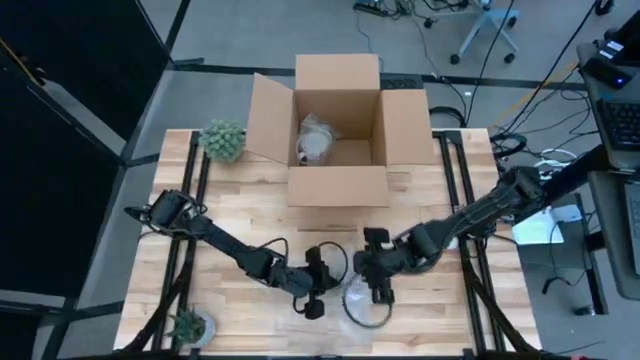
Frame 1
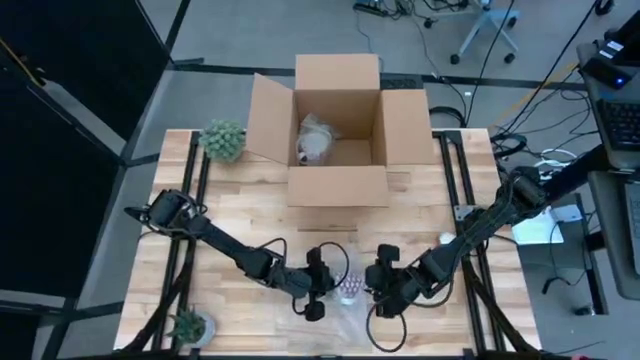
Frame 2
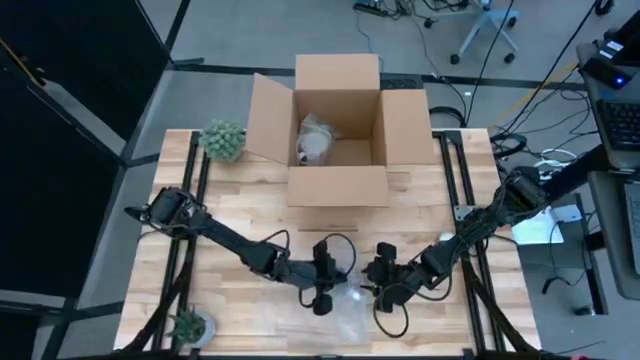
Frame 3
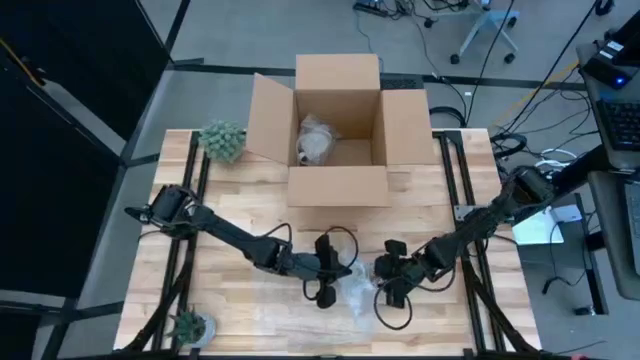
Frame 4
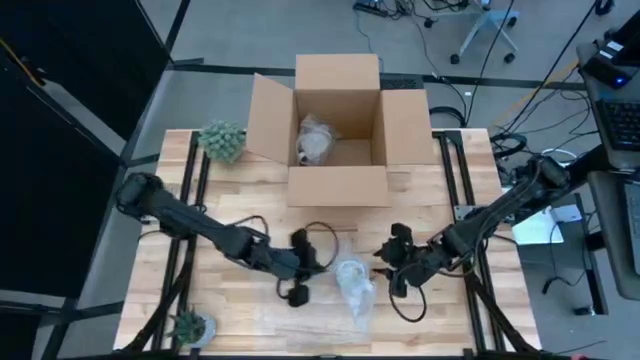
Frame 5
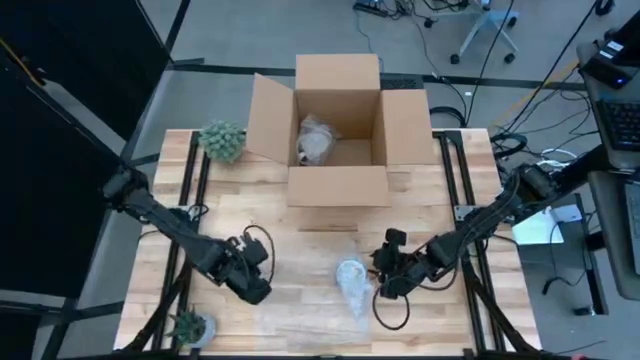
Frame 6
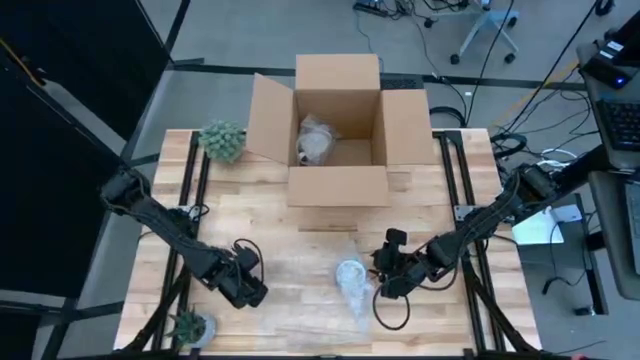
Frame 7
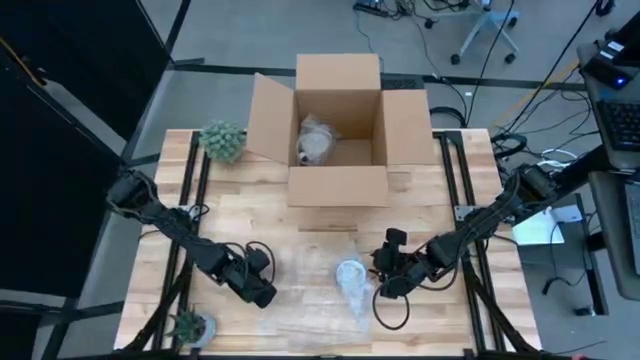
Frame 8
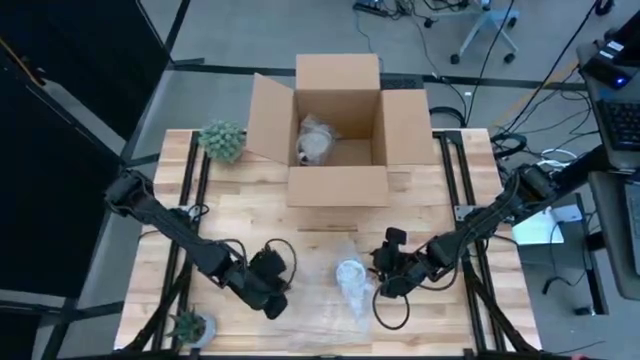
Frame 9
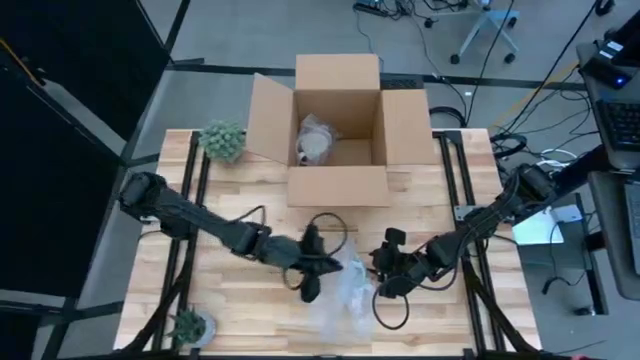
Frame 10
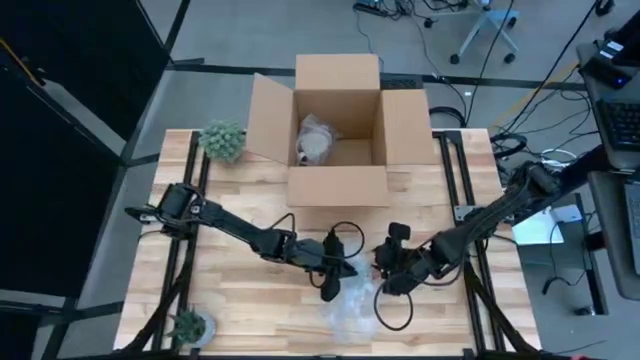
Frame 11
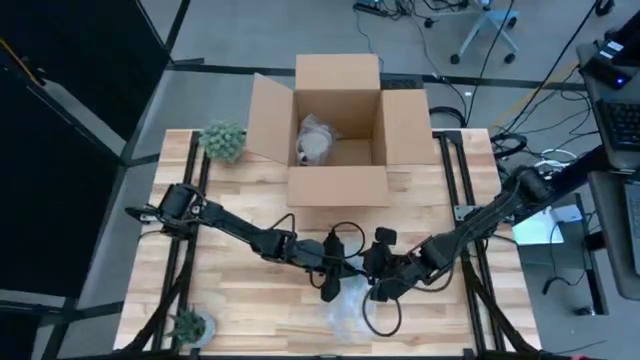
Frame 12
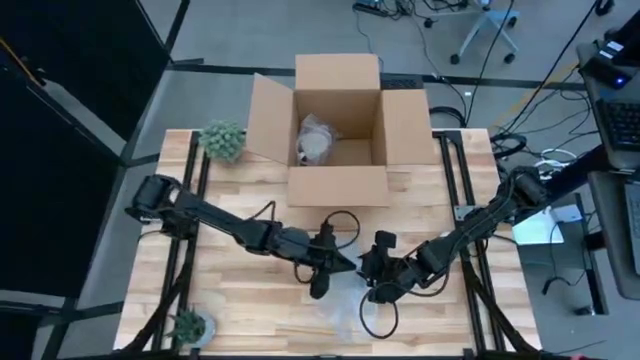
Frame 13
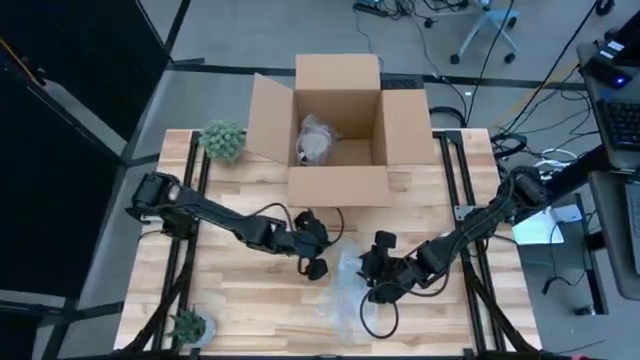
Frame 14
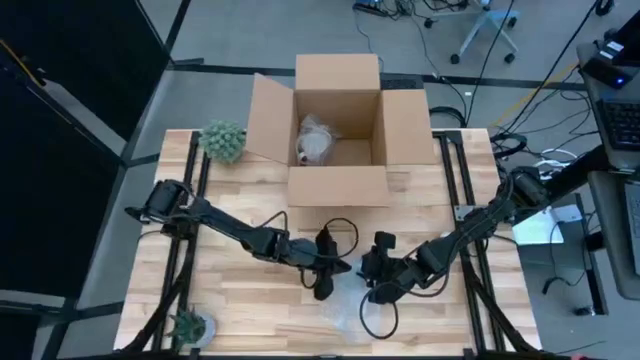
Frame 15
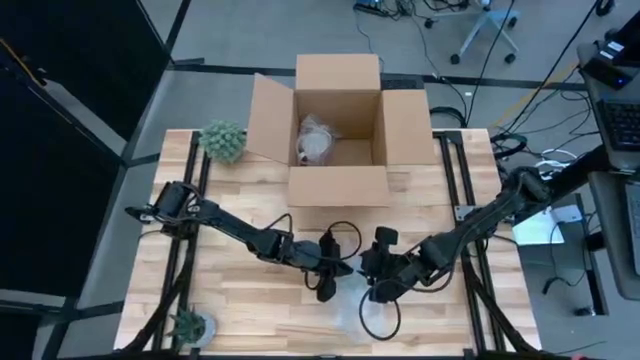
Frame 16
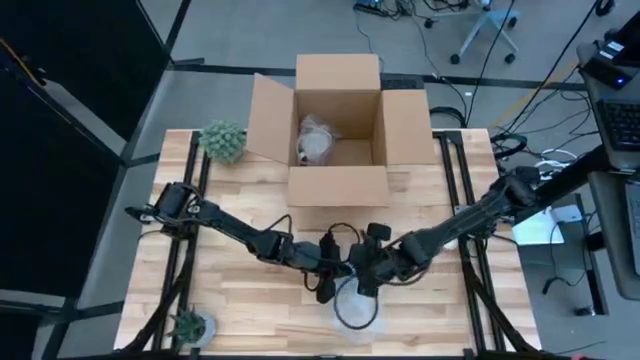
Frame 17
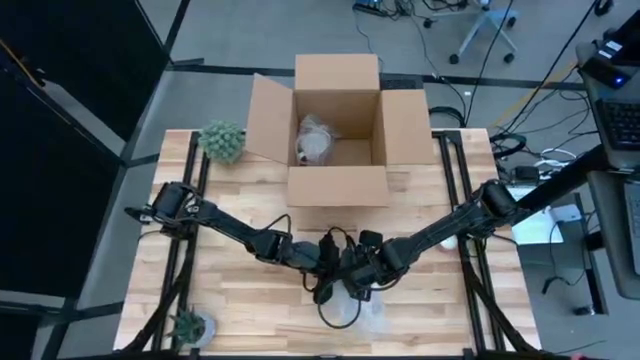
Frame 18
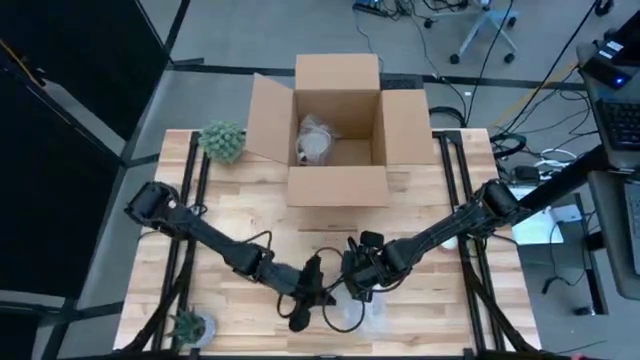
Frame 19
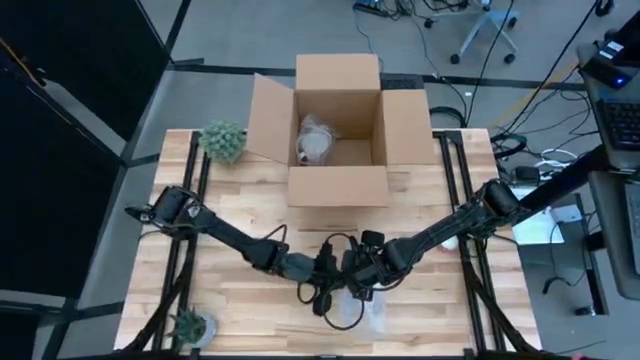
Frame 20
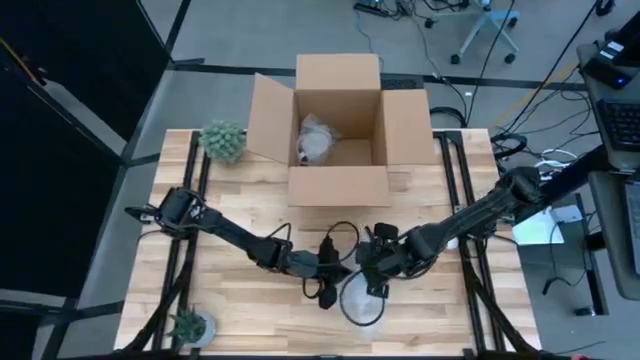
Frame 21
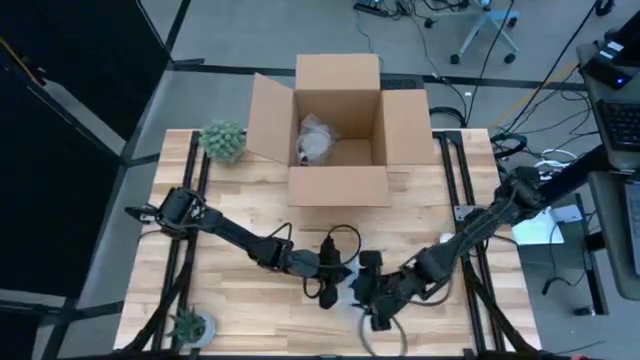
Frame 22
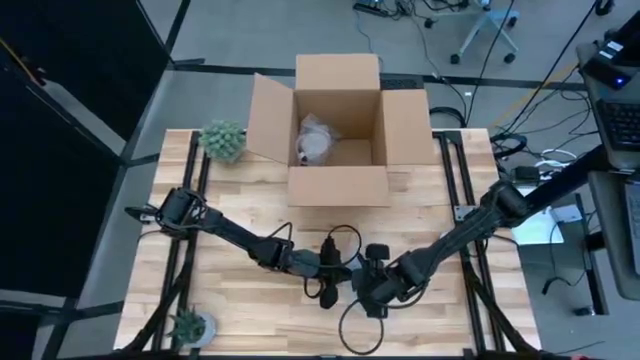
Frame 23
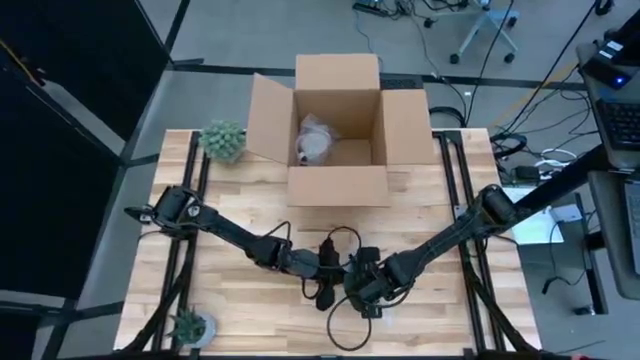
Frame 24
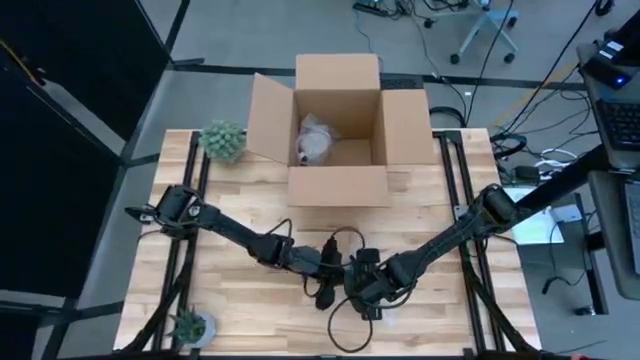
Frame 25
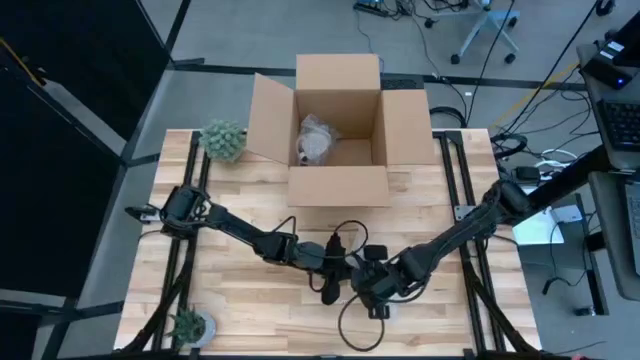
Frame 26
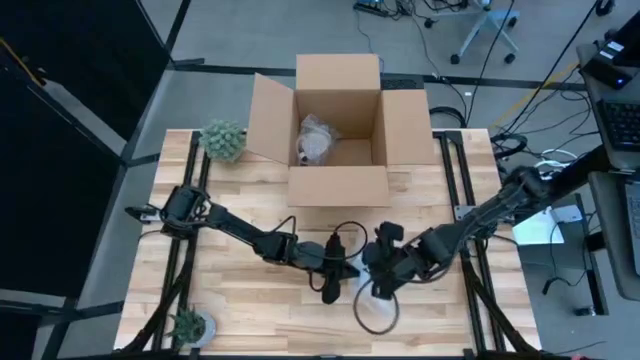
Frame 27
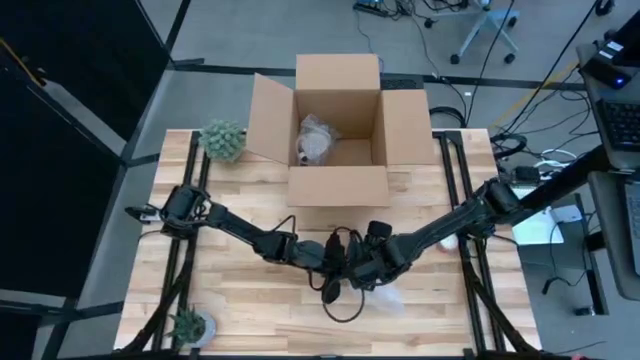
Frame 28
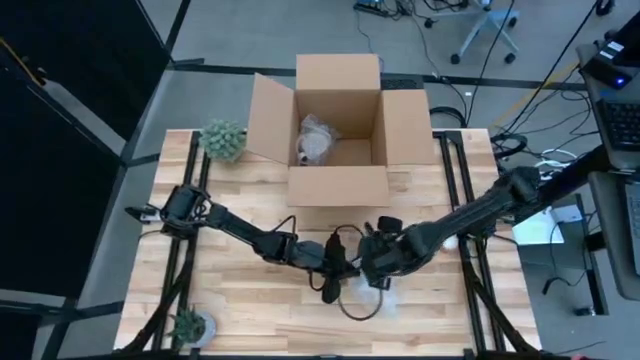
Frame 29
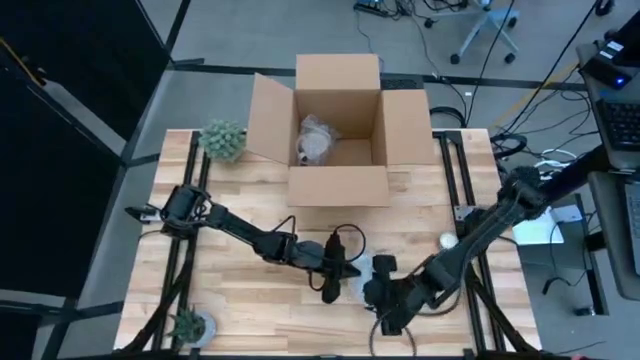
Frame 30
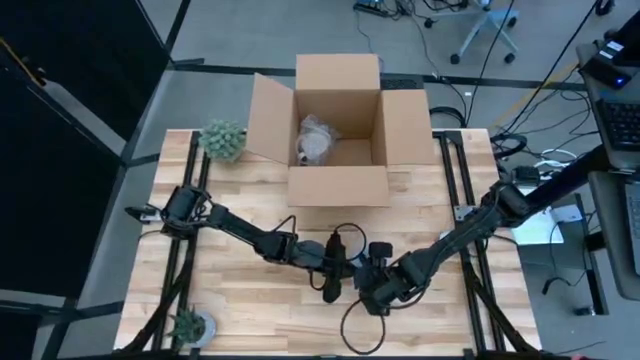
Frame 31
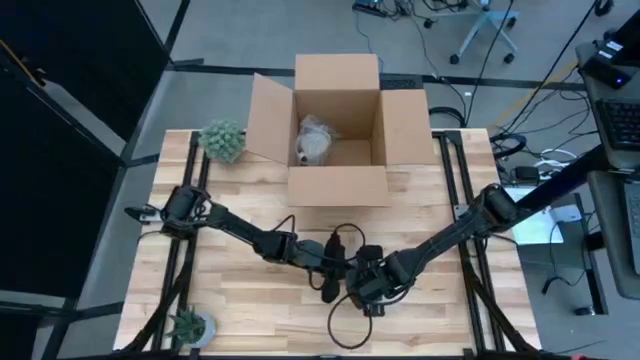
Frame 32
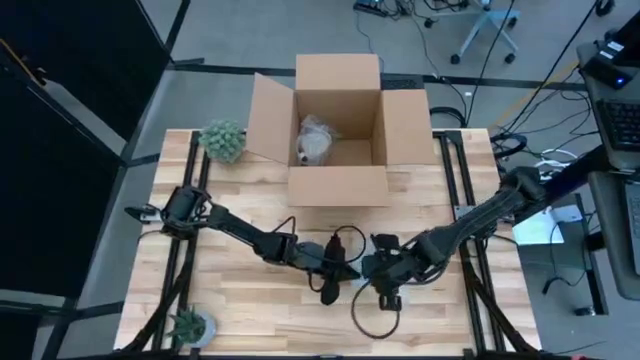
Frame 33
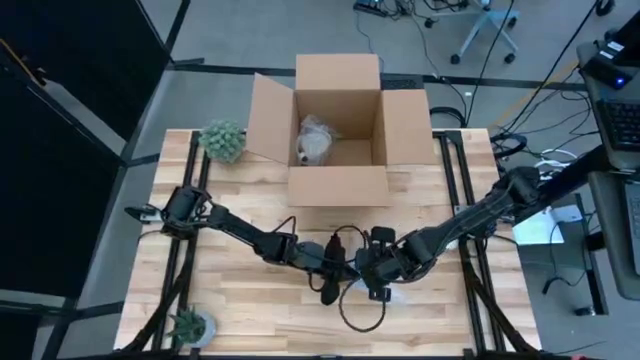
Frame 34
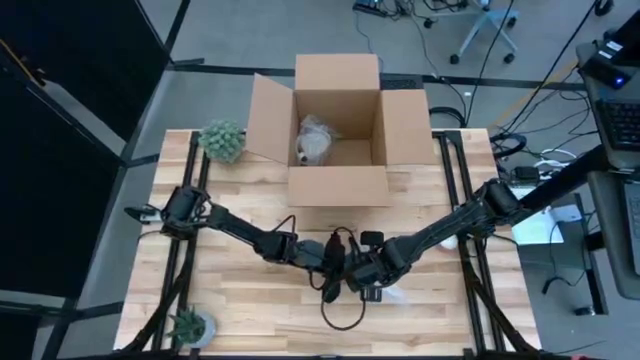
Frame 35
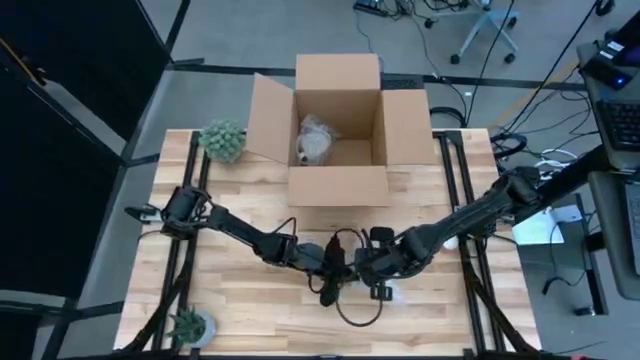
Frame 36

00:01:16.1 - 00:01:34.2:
Task: wrap mug
Wrap the red mug with the bubble wrap

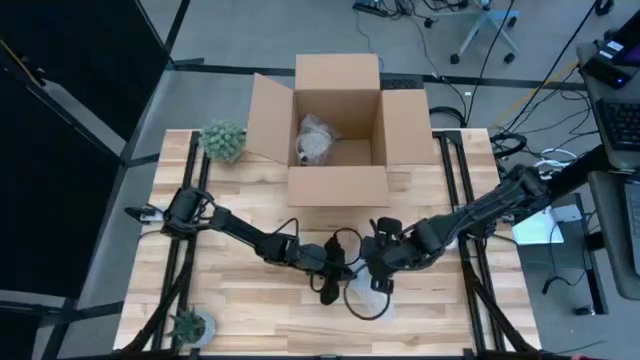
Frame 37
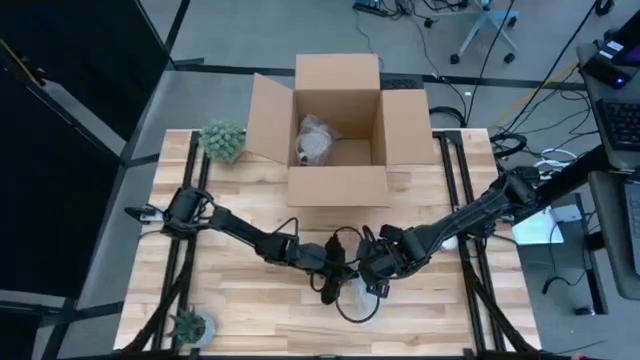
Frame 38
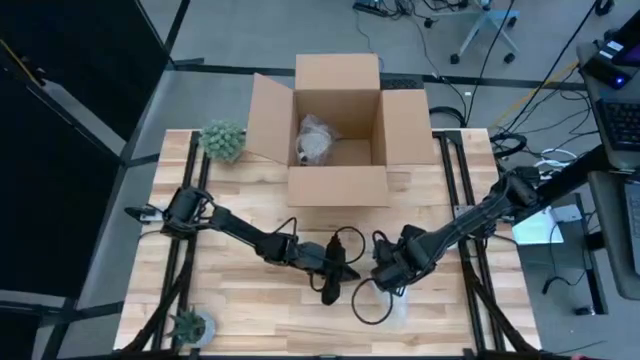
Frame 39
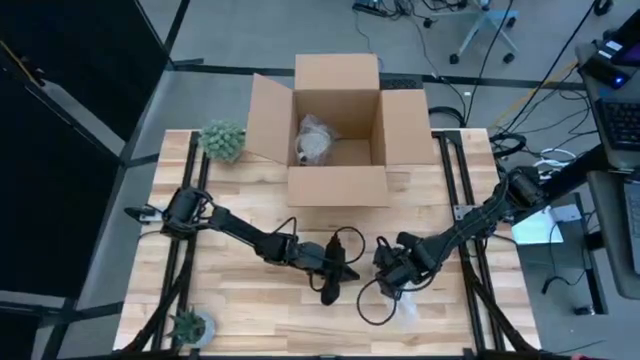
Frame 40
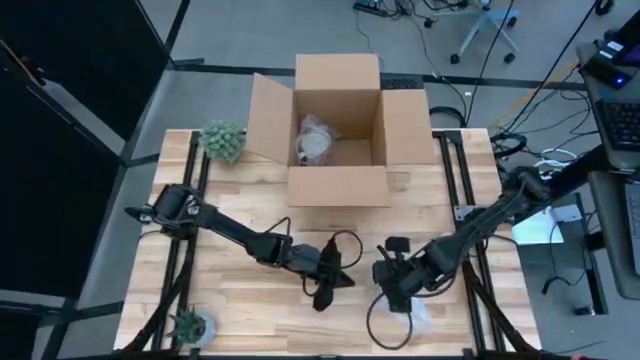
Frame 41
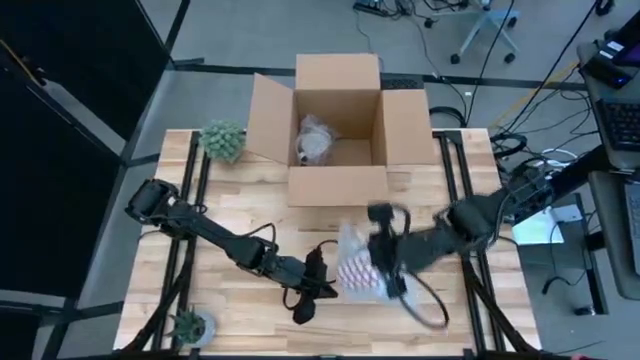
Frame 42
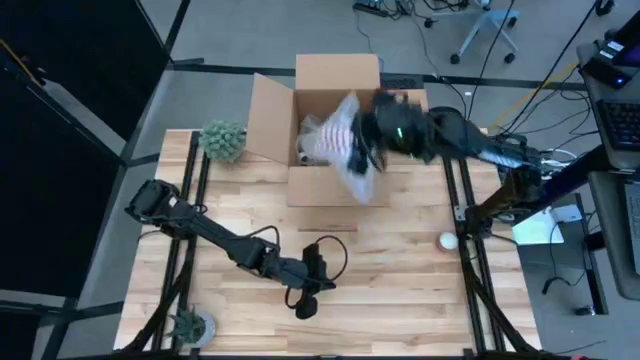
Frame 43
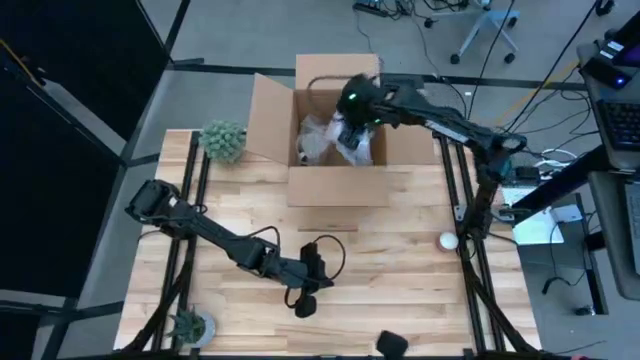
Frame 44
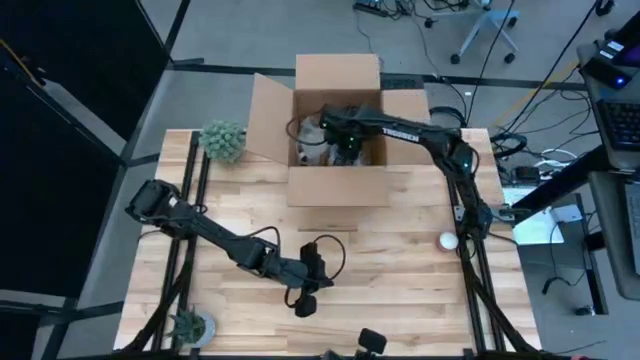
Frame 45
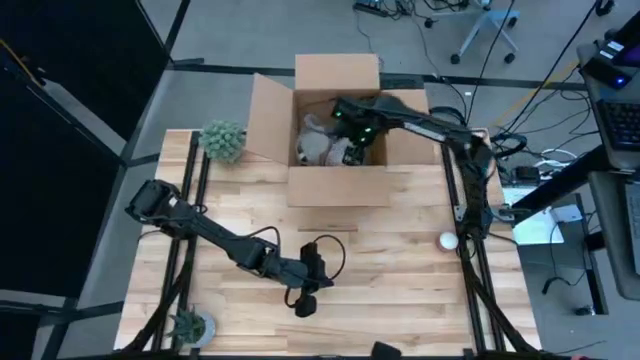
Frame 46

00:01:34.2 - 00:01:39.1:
Put the wrapped red mug into the cardboard box

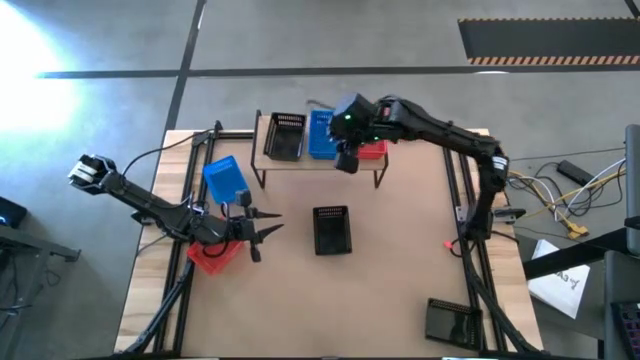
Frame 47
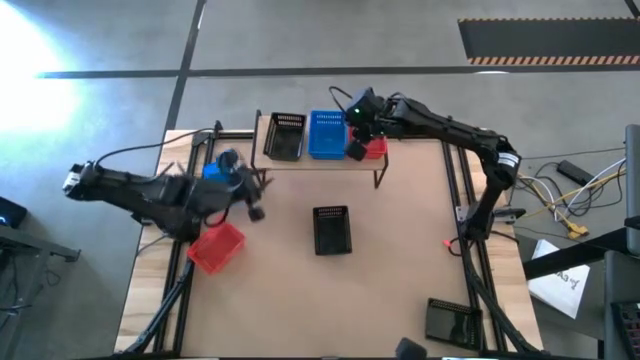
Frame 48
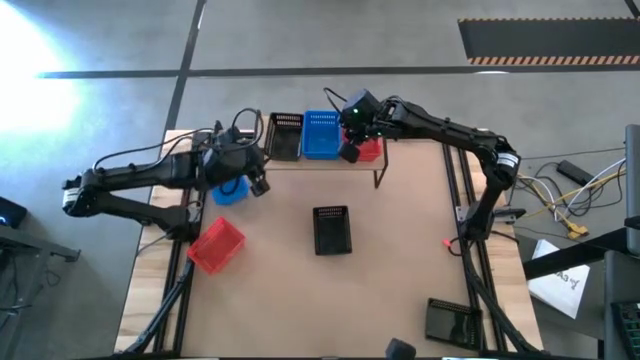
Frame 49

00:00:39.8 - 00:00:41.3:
Task: Stack baskets on shelf by color
Adjust the stack of orange bins
